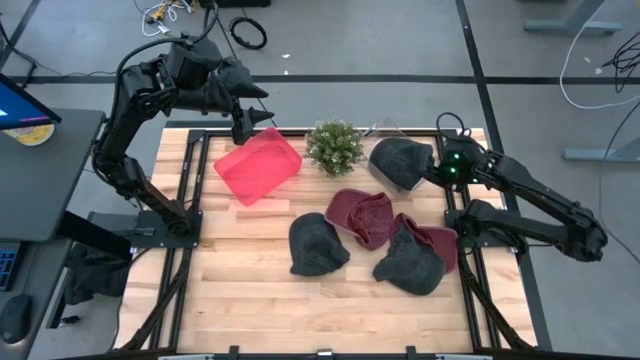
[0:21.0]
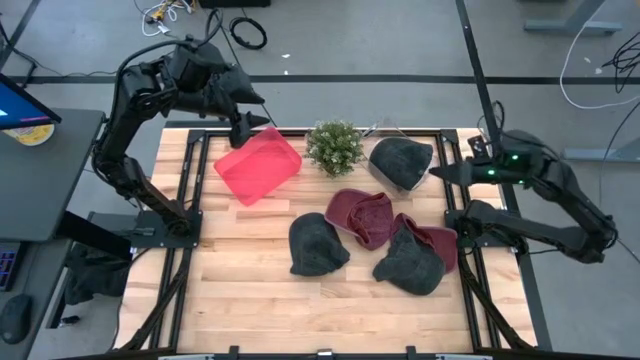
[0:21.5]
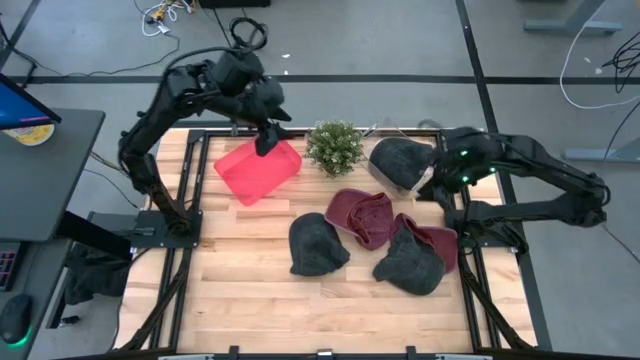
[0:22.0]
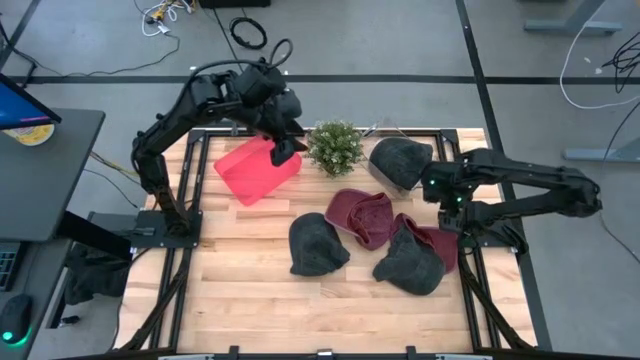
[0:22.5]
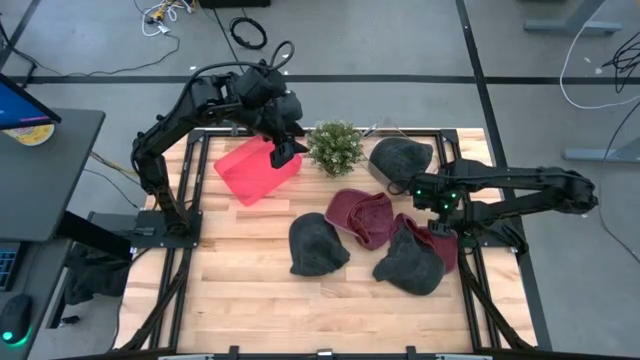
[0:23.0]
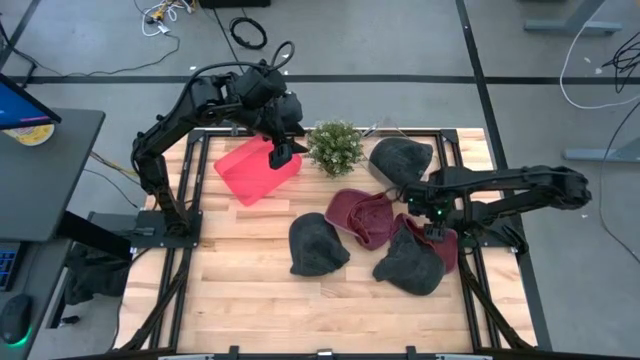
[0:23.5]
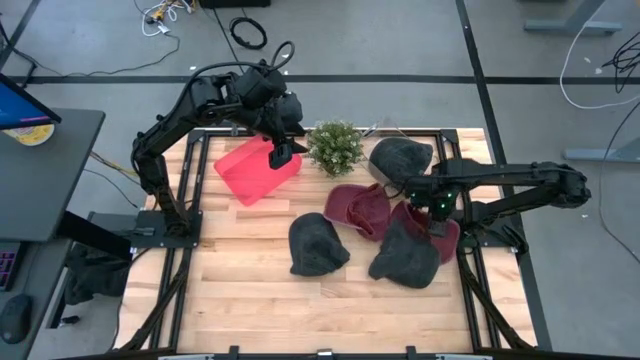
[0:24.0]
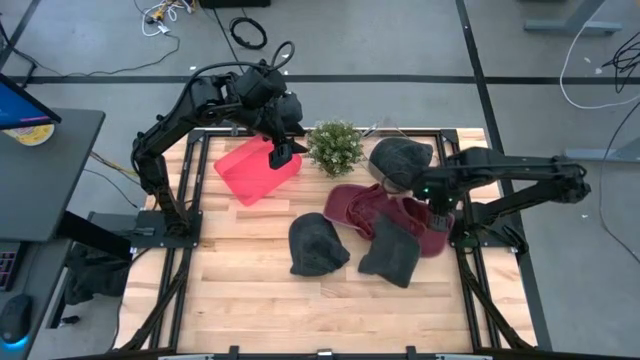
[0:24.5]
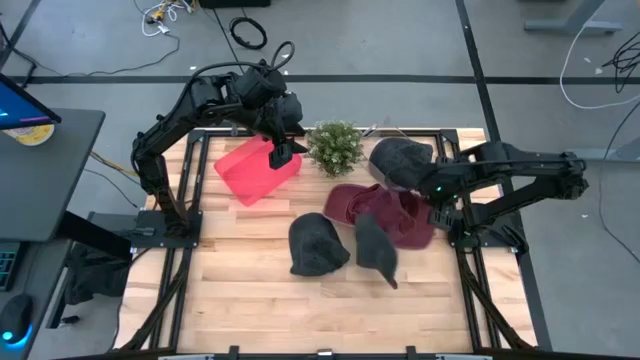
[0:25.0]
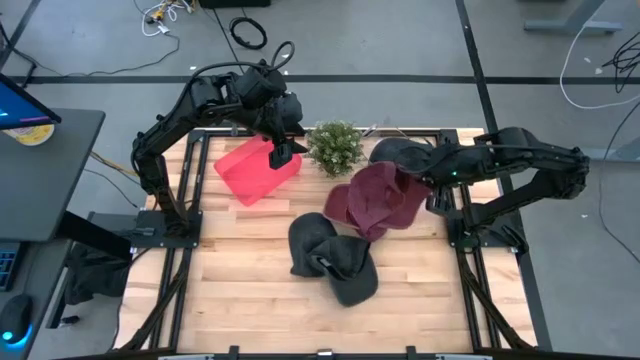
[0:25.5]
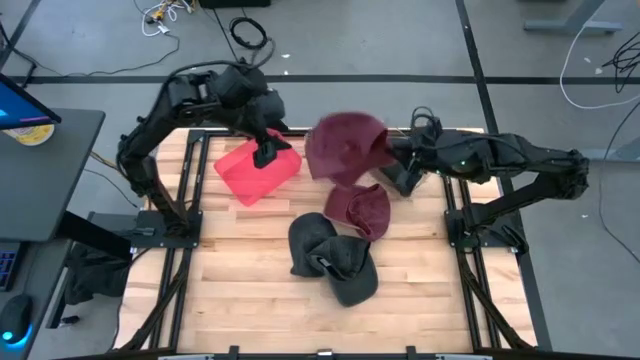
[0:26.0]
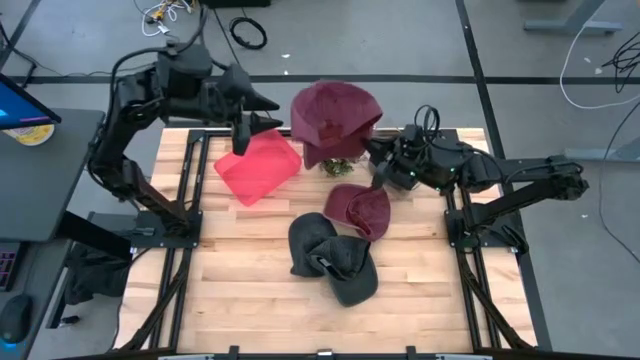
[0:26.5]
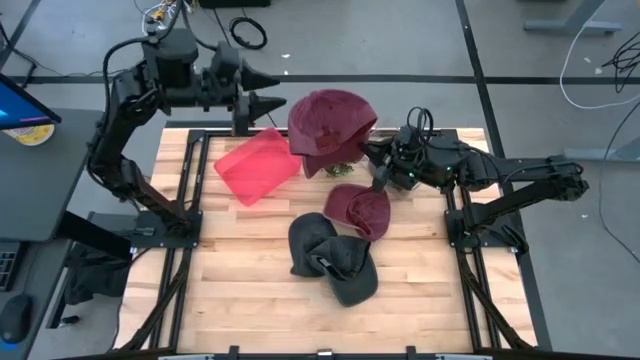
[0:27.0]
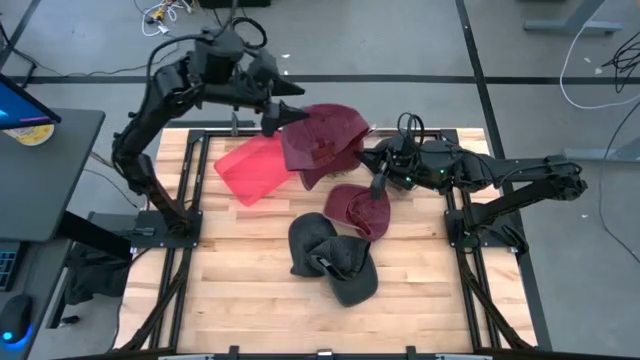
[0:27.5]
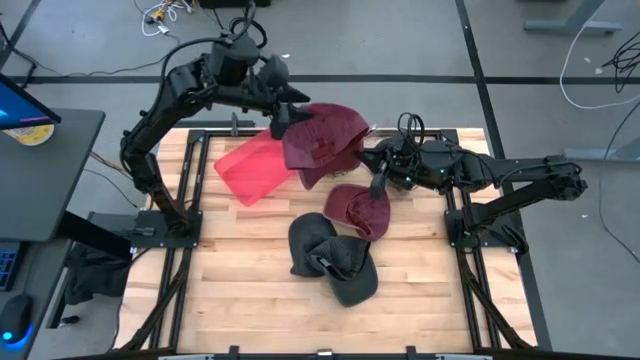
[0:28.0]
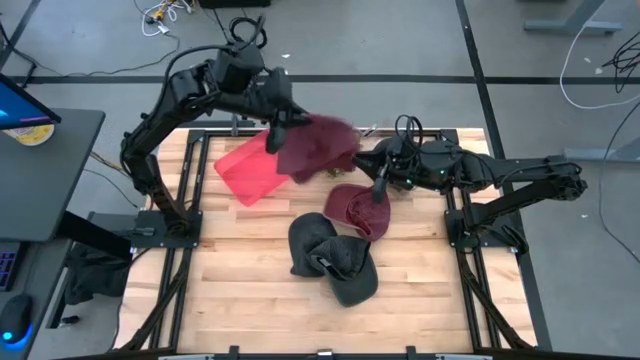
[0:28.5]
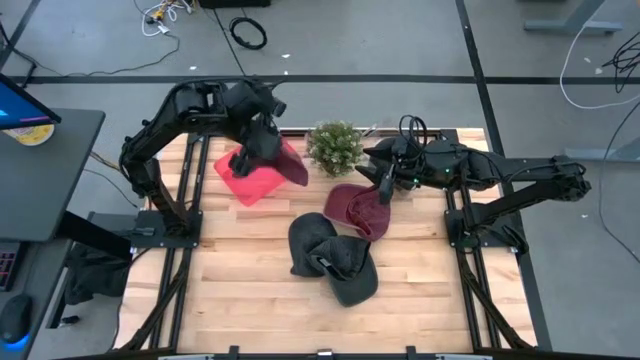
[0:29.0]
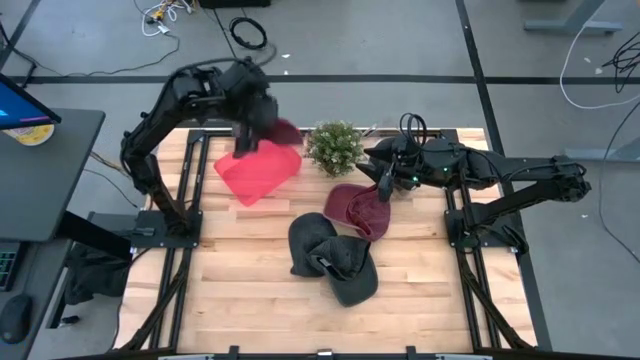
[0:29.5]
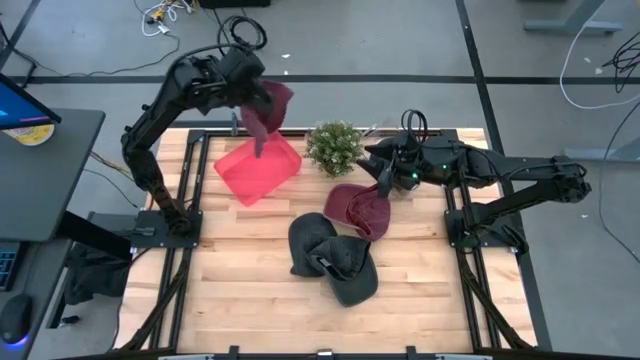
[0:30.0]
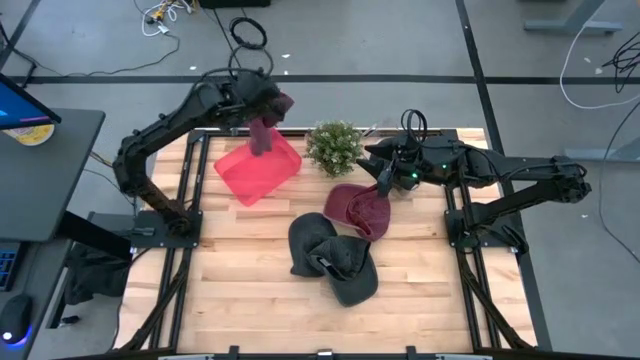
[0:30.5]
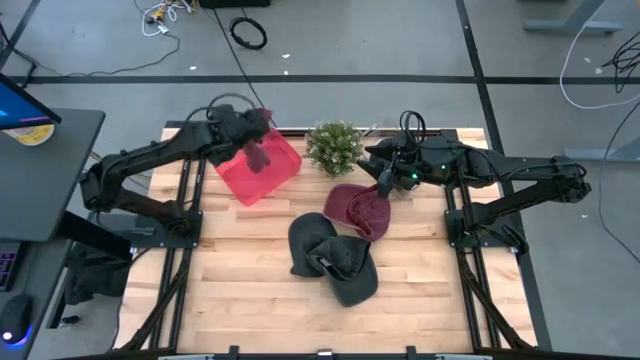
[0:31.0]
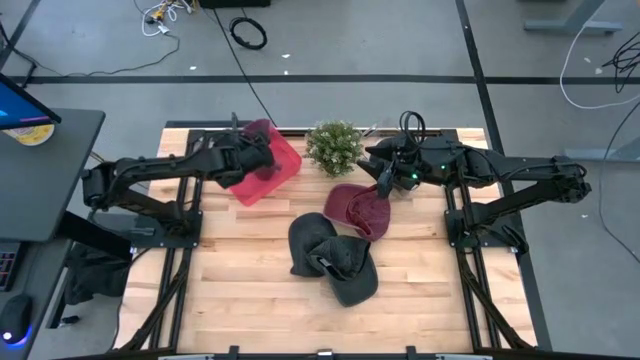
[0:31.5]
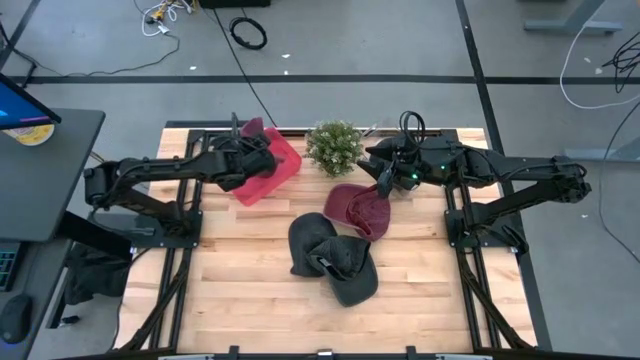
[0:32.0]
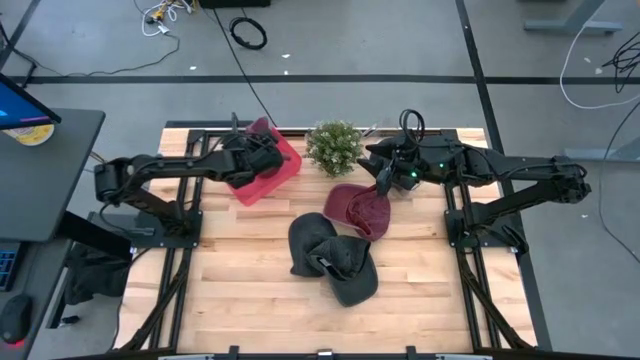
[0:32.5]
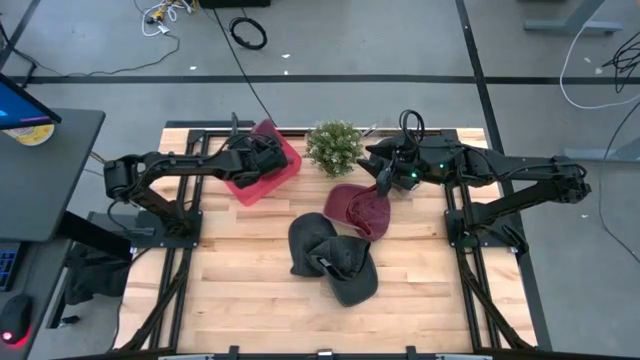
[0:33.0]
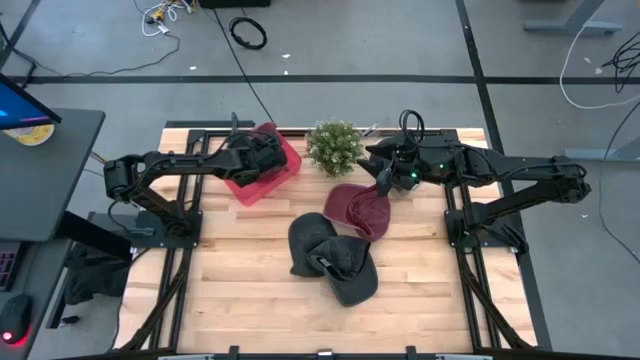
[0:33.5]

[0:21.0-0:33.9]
Task: Pick & Place hat
Put the right red cap into the red bin

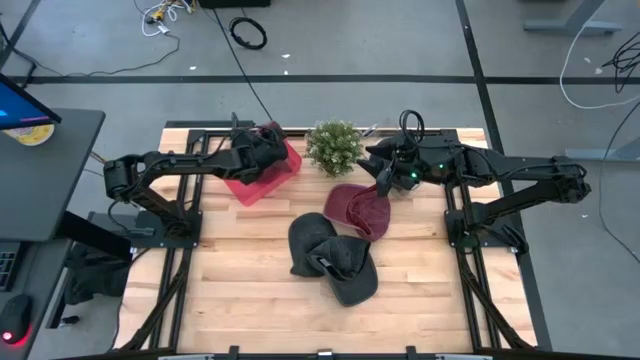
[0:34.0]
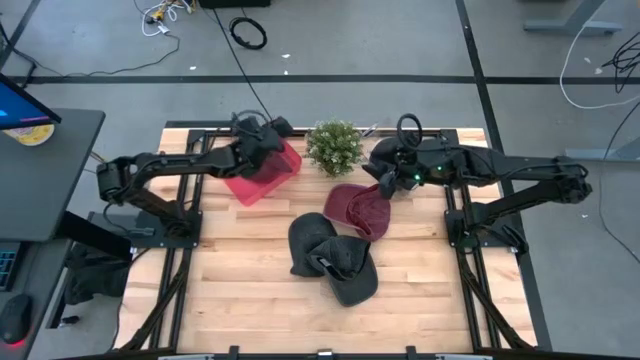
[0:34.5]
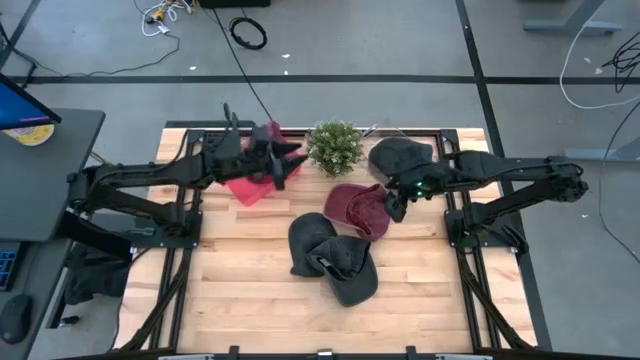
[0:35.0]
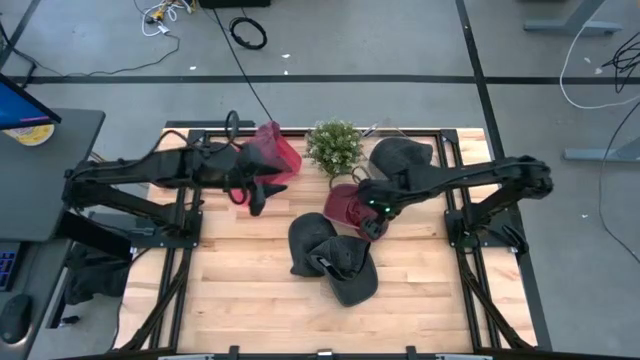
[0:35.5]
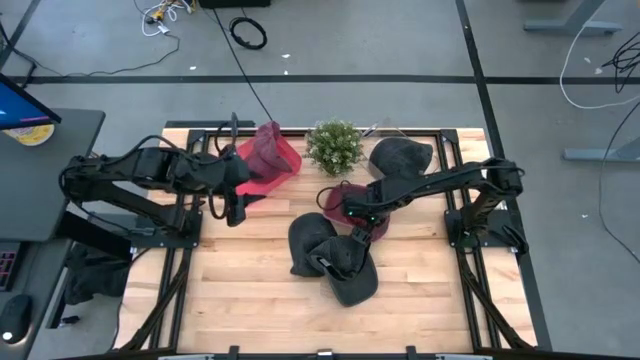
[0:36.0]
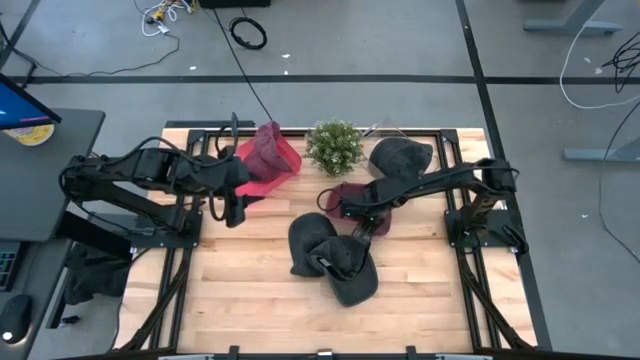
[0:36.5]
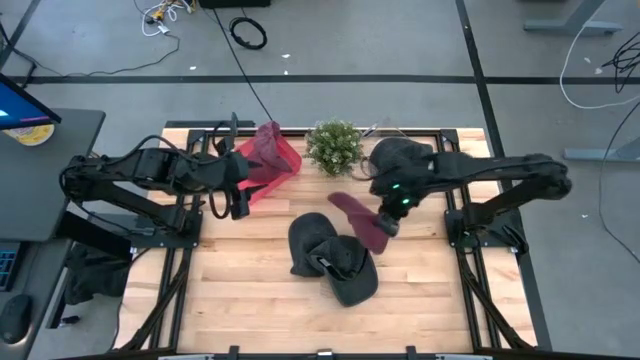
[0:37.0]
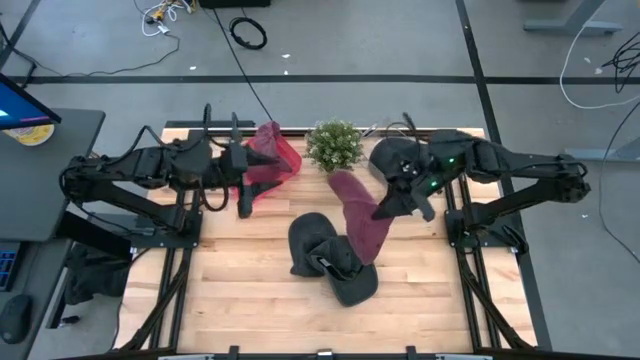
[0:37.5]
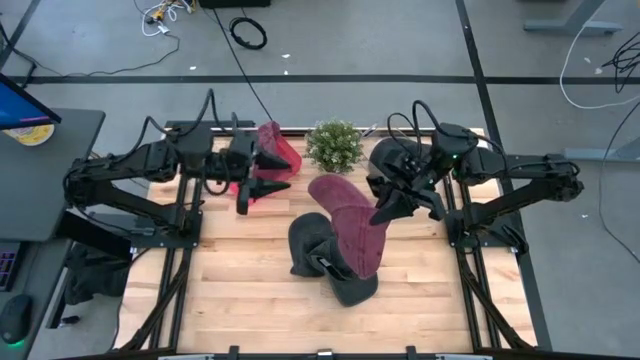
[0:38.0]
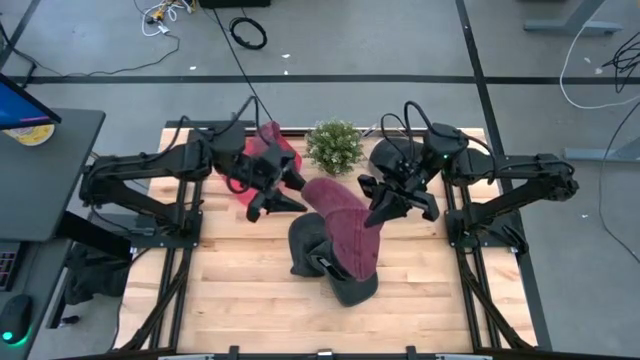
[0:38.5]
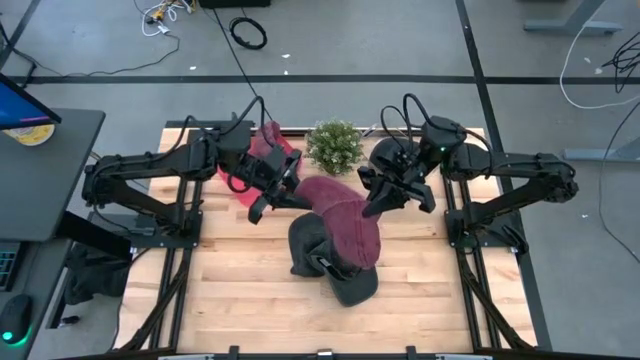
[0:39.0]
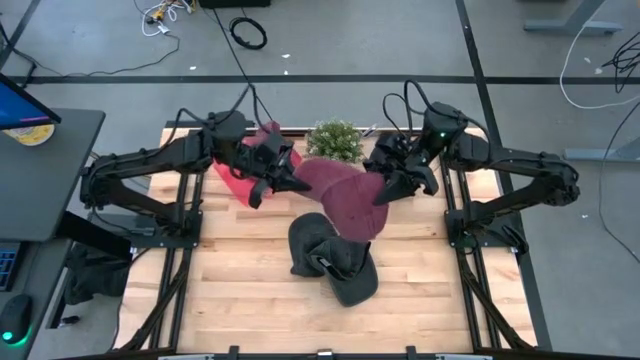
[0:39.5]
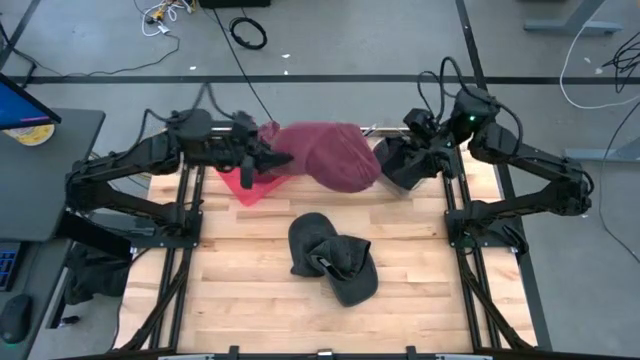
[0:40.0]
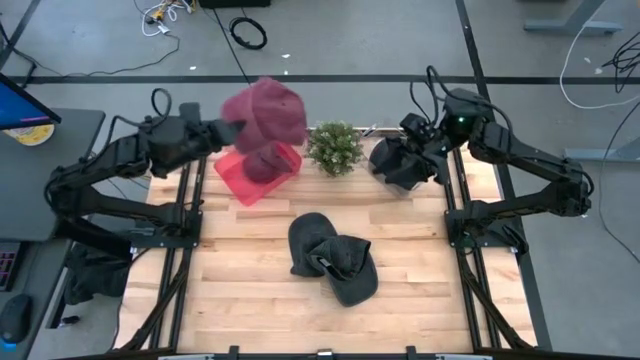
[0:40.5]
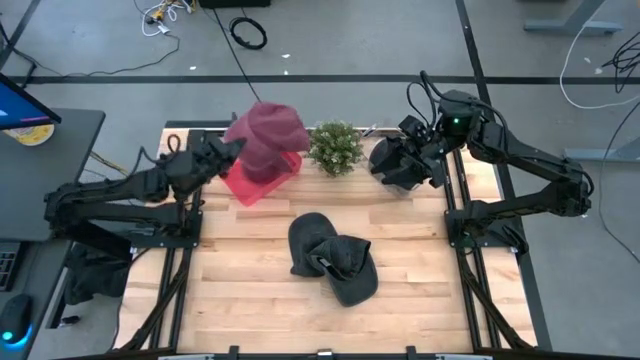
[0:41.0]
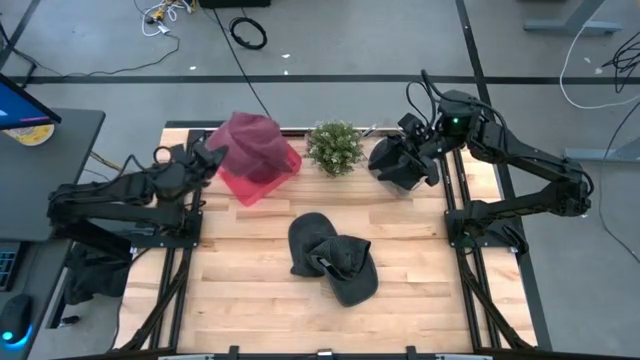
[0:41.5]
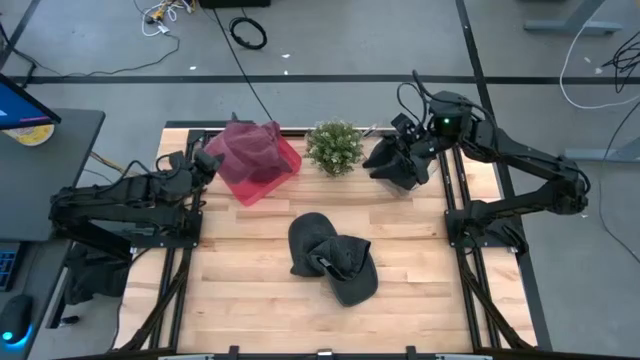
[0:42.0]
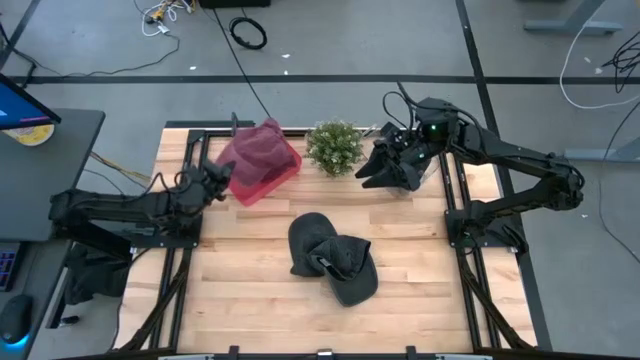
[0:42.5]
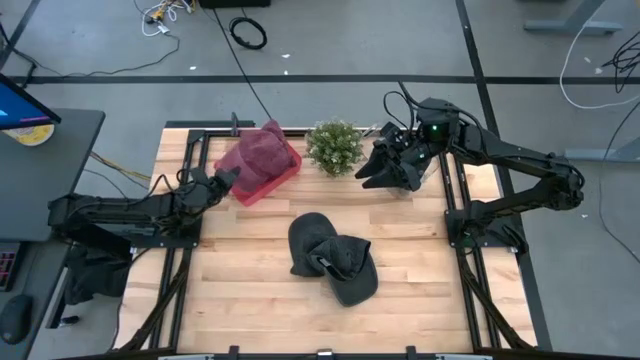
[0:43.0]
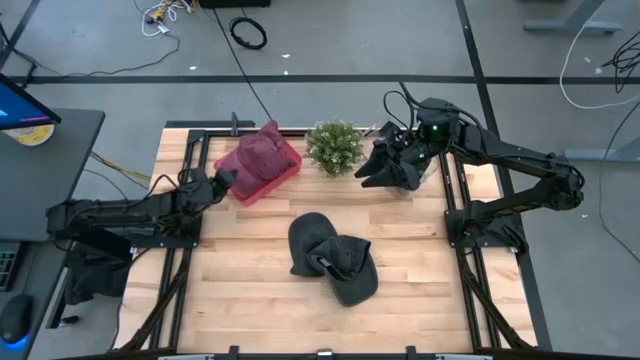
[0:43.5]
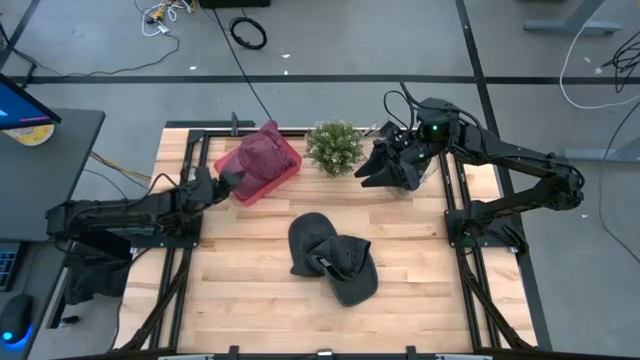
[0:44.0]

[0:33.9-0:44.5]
Put the red cap into the red bin
